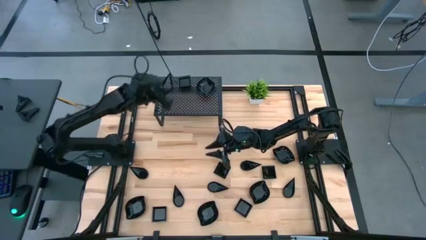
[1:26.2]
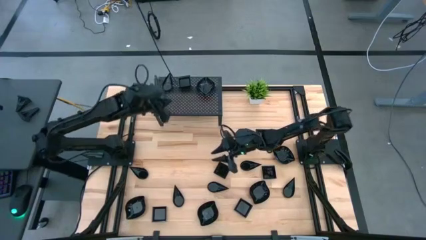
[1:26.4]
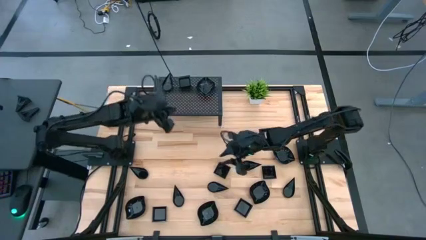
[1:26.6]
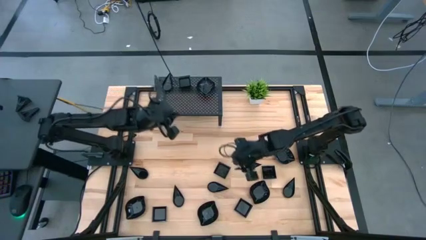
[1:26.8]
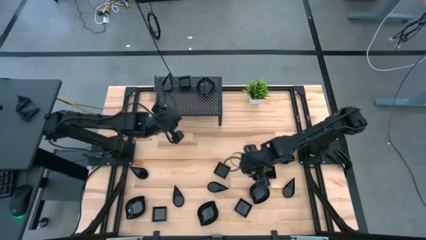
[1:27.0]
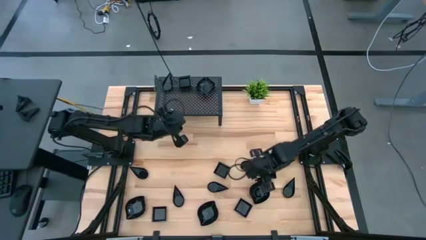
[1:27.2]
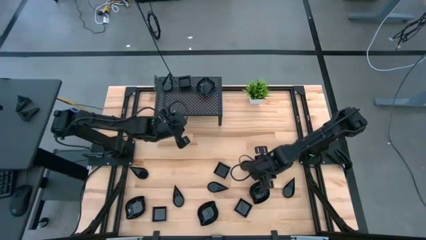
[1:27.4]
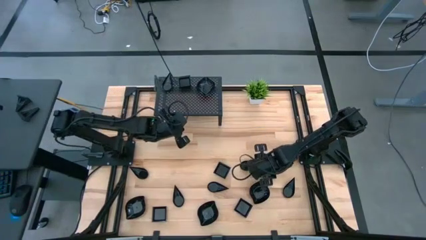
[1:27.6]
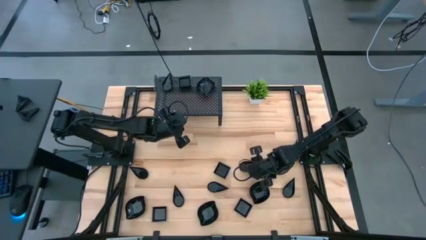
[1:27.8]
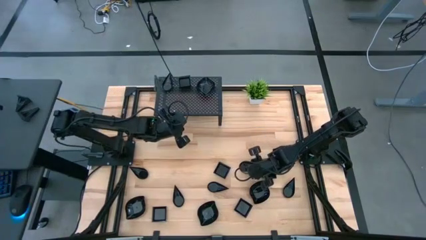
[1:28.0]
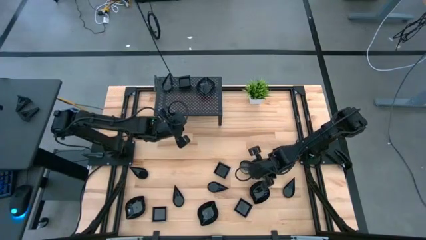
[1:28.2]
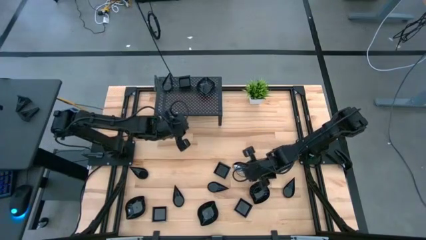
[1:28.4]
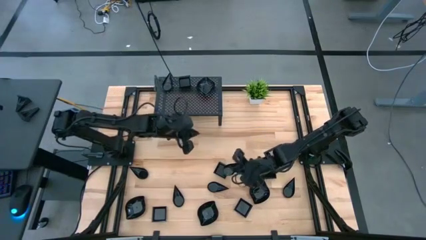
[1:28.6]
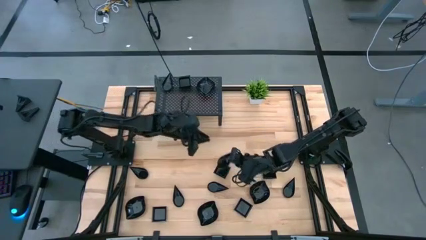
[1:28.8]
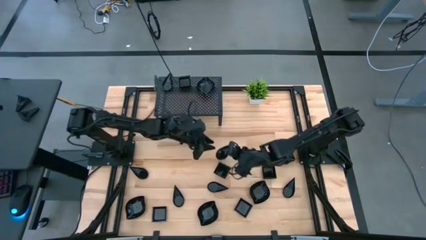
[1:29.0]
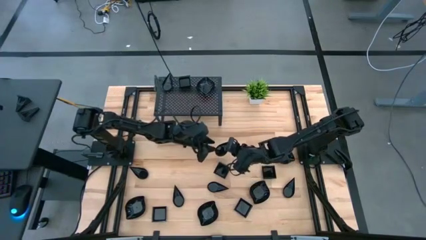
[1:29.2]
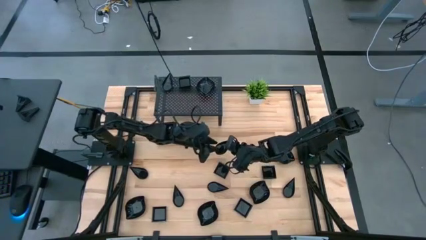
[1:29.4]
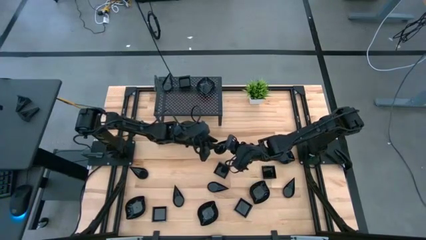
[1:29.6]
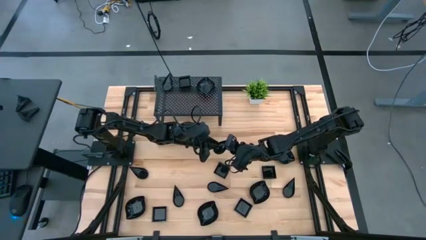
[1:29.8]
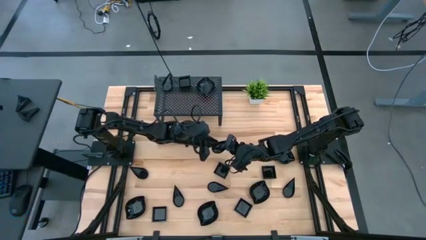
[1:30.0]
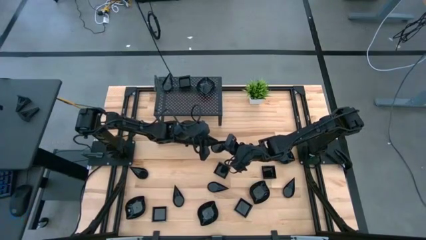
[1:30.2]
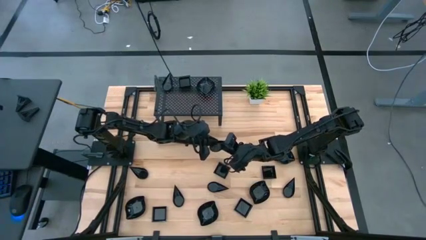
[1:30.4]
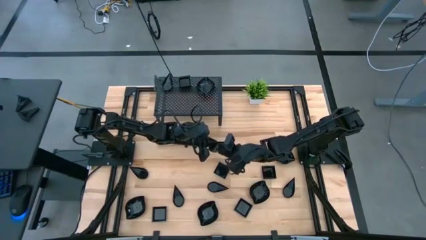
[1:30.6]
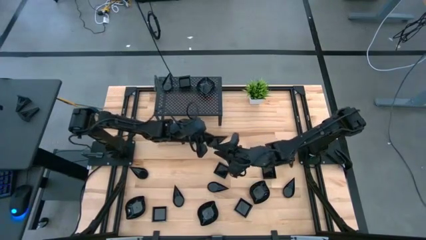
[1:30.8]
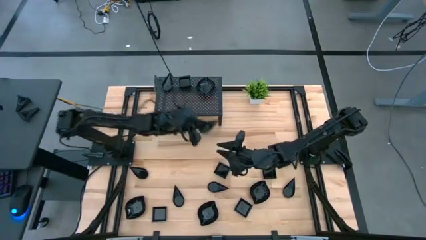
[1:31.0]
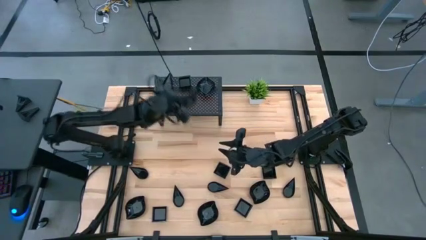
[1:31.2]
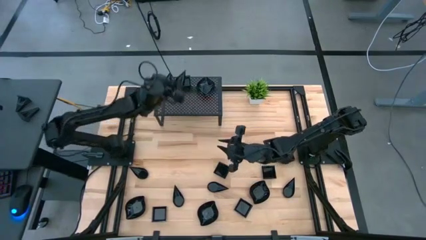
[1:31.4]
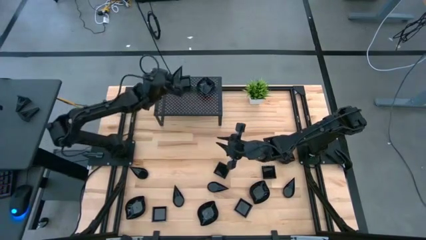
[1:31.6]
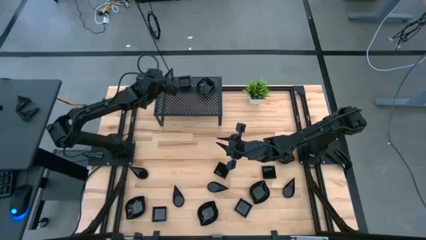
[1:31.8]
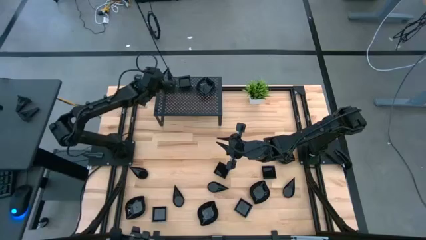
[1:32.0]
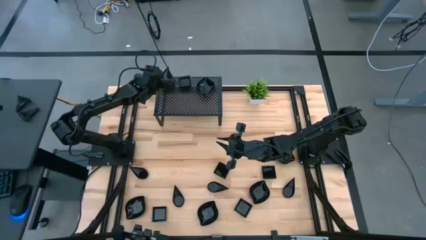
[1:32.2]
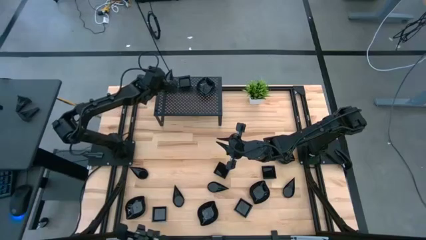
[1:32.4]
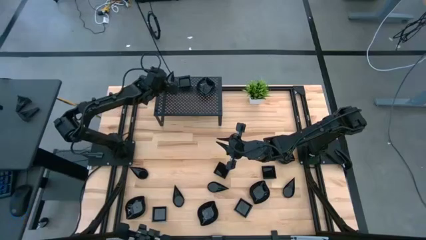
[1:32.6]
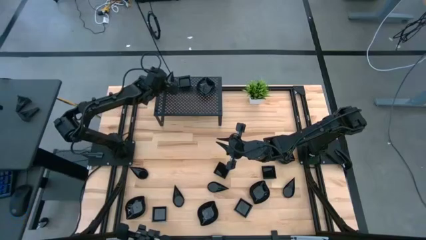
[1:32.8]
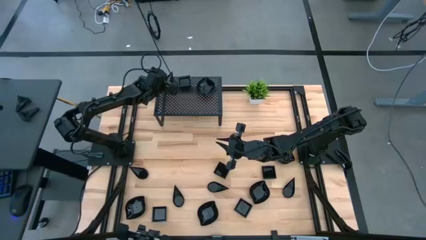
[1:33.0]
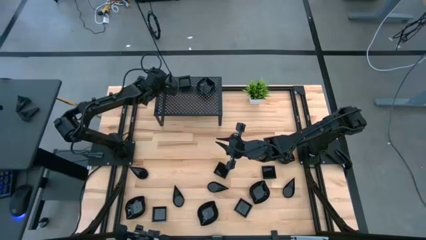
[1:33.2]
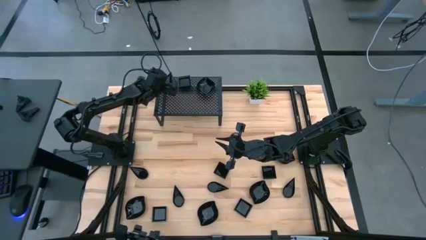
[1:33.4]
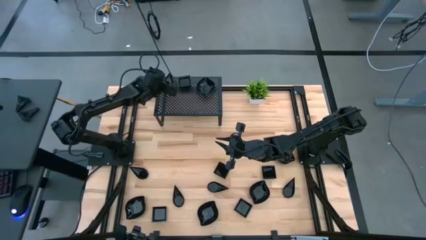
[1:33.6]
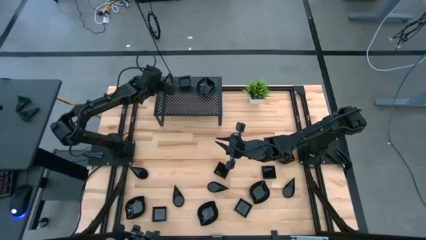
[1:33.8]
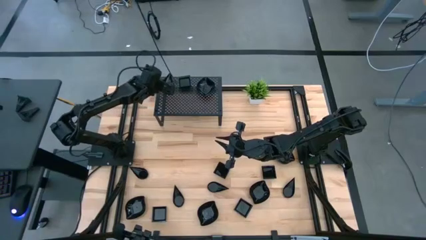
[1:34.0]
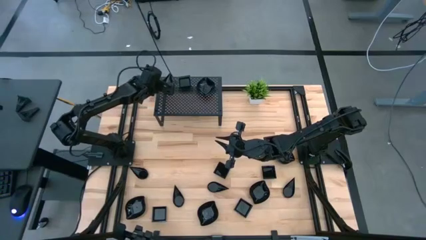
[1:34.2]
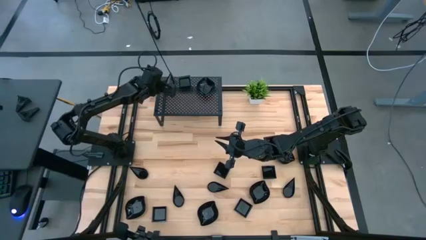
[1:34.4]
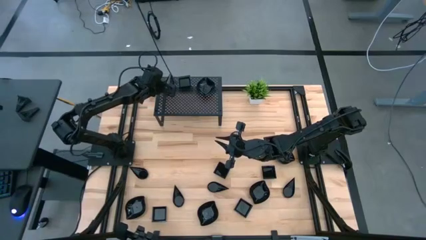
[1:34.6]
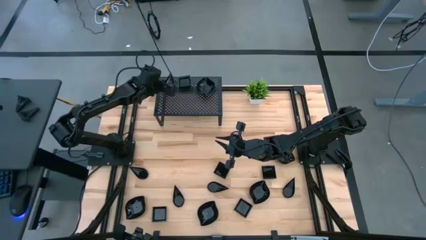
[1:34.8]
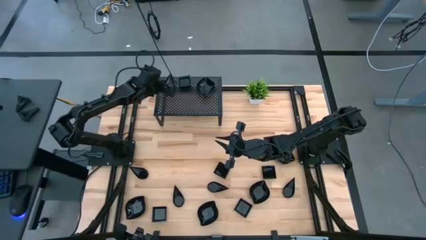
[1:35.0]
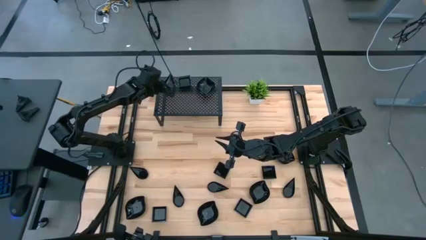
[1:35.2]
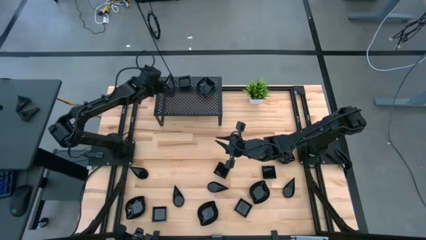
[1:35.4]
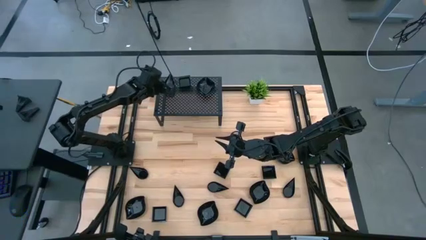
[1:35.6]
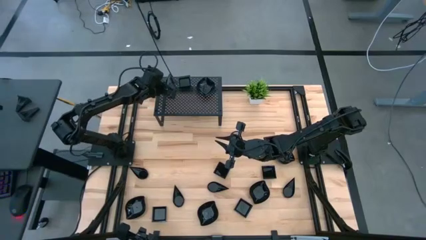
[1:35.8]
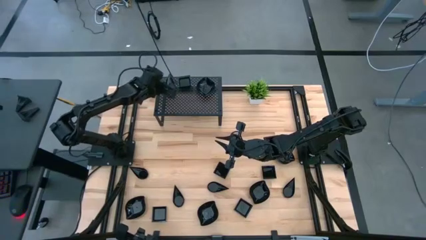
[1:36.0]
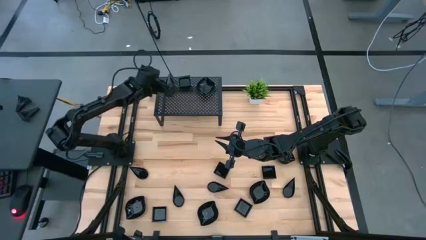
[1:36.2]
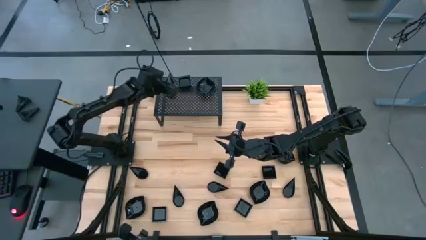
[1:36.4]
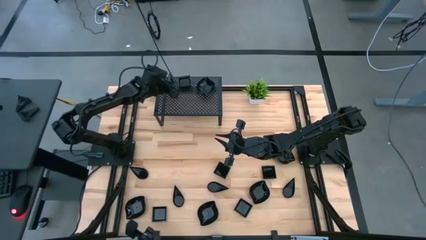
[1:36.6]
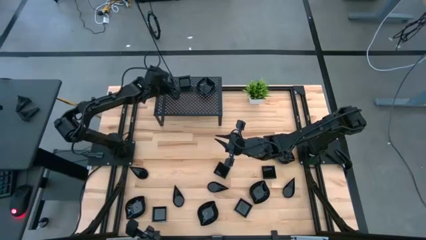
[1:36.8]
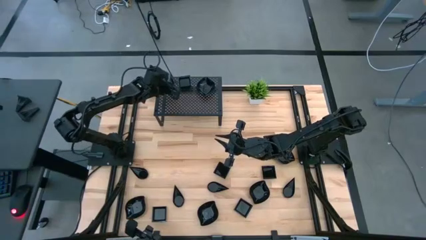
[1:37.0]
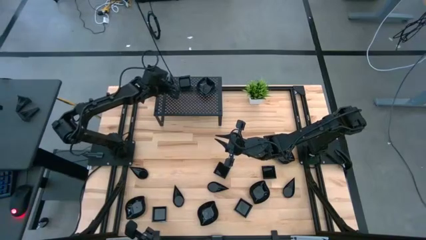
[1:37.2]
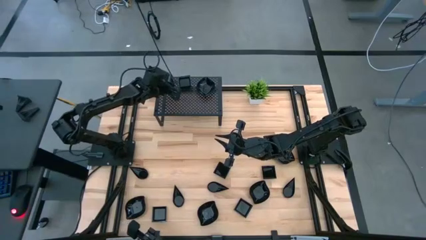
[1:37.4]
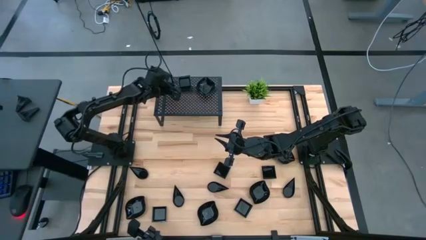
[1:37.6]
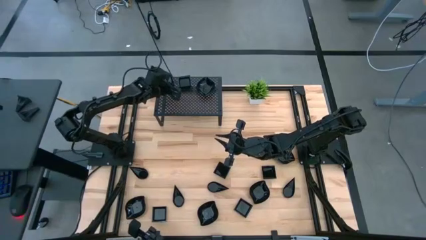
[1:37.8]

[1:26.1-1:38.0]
Task: Pick & Place Mini shaped plates
Stack the black drop-shaped plate on top of the drop-shaped plate on the shelf

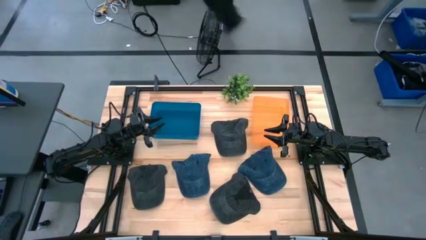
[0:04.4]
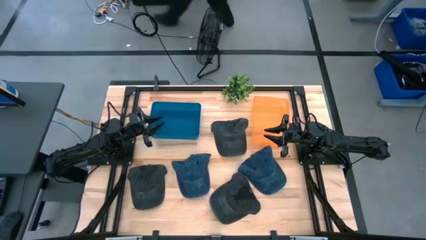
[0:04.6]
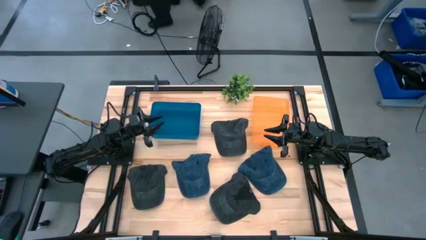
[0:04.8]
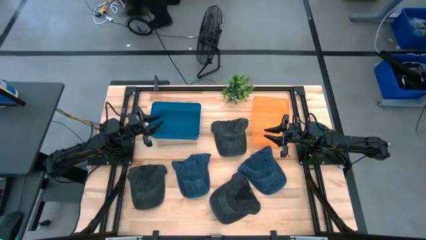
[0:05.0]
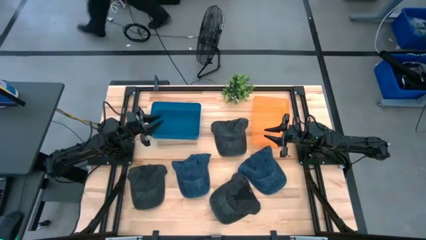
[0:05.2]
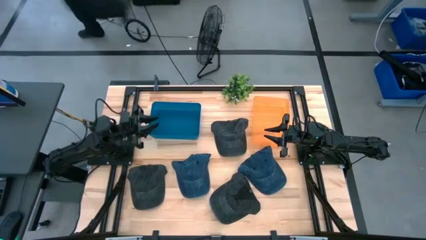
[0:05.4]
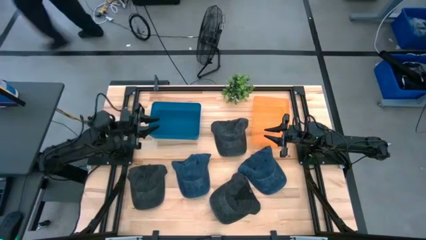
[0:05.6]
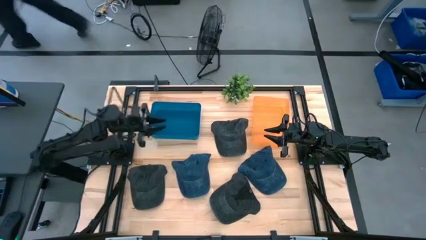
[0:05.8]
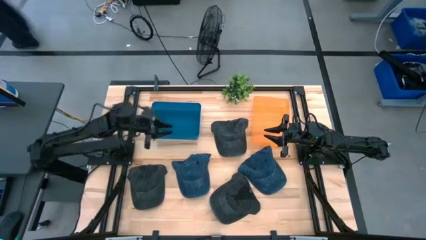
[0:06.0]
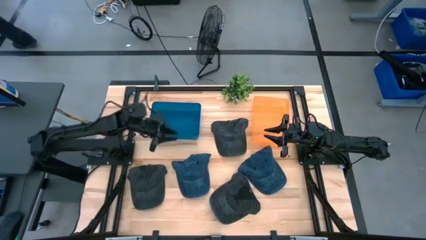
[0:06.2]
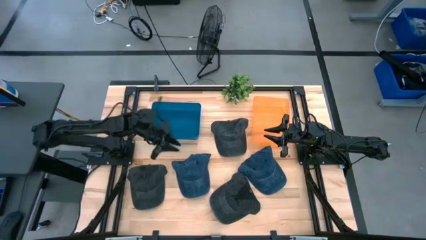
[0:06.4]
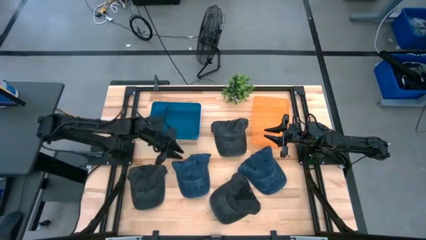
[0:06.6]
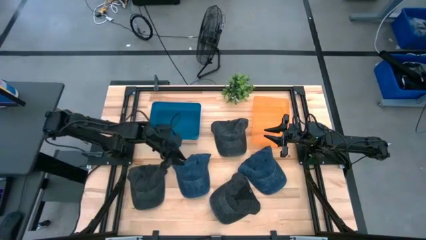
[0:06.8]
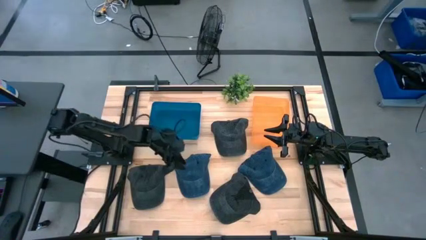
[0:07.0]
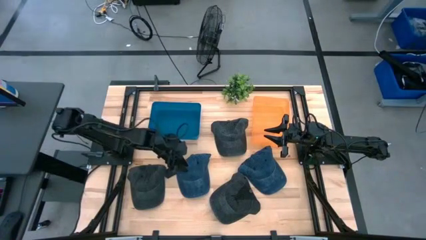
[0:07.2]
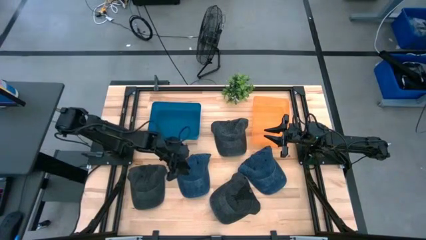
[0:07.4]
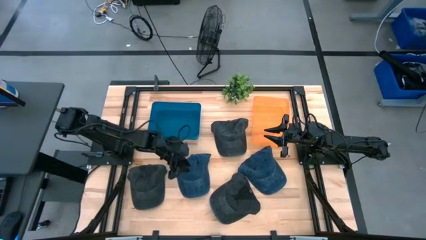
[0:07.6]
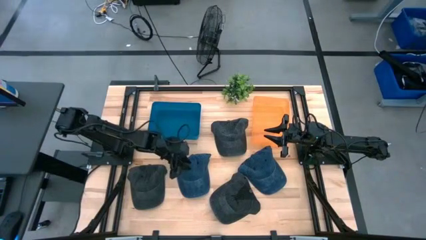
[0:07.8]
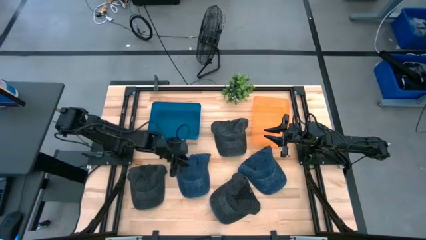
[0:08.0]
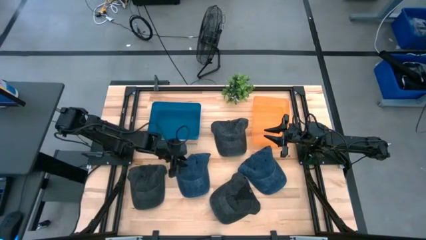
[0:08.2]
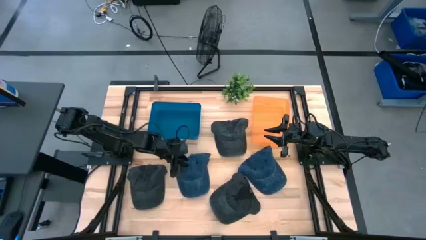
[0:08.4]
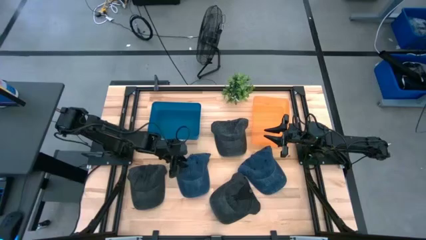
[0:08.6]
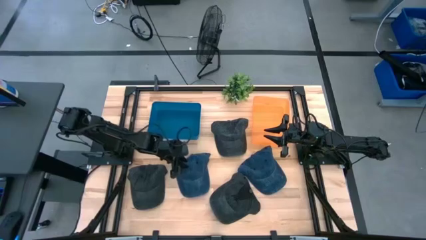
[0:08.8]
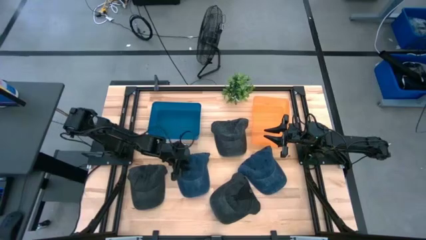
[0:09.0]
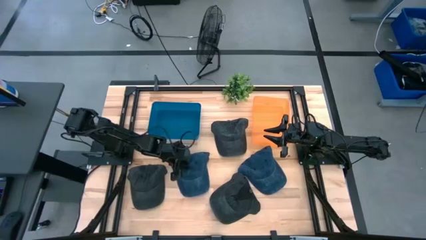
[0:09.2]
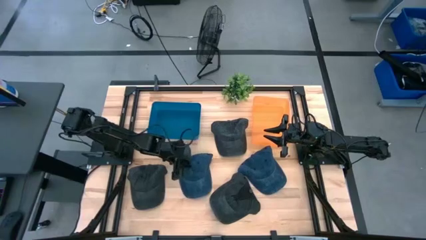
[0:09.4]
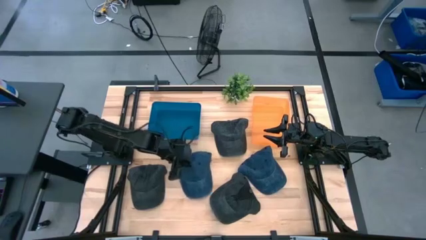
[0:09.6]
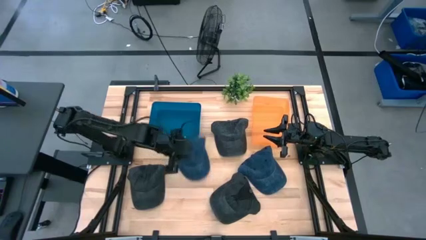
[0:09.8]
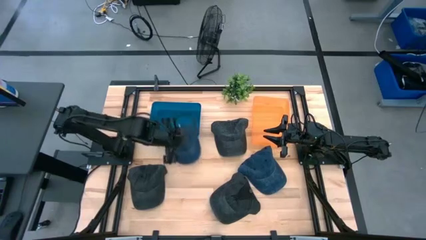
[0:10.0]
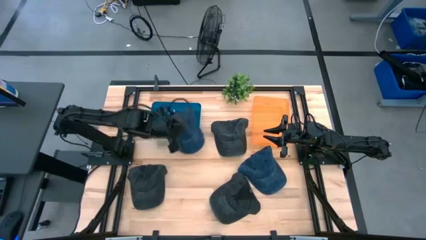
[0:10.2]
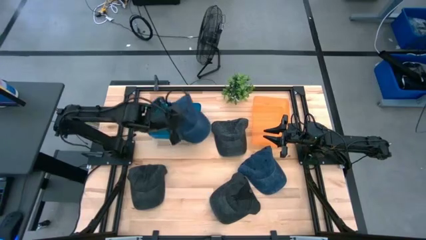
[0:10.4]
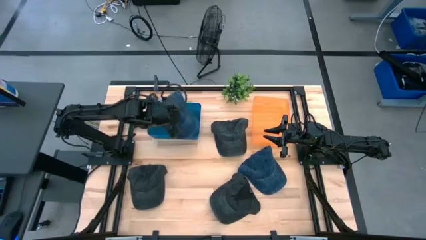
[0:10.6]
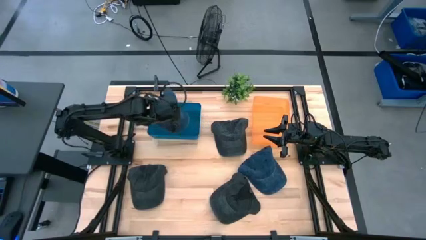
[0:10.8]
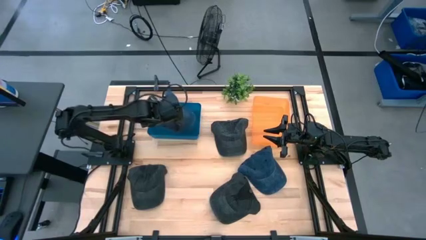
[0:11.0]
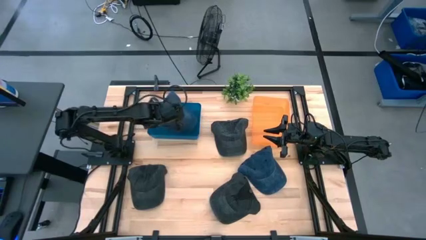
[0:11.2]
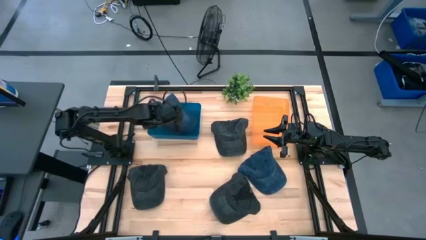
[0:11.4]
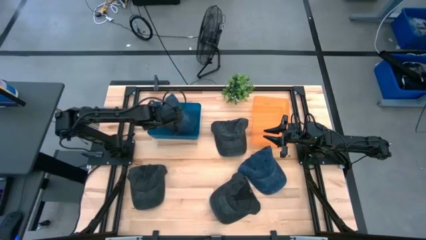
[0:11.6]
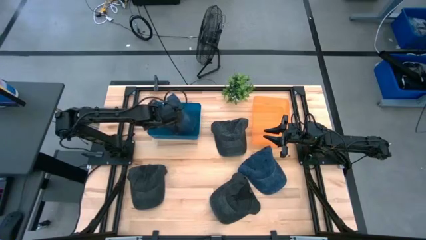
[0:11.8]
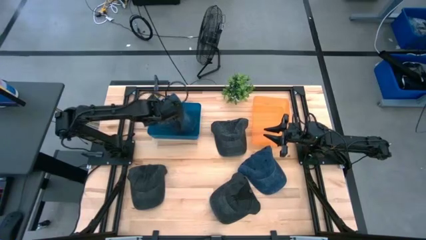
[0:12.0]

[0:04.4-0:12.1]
Task: Pick & Place hat
Put the left blue cap into the blue bin
